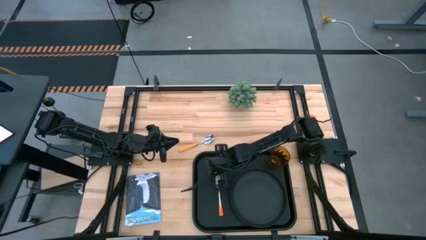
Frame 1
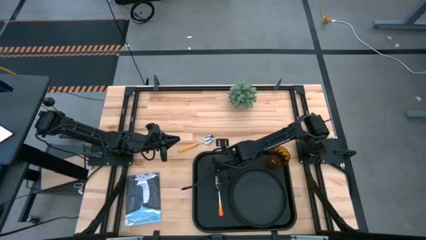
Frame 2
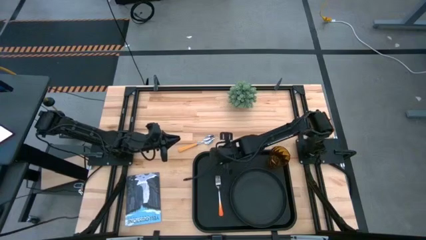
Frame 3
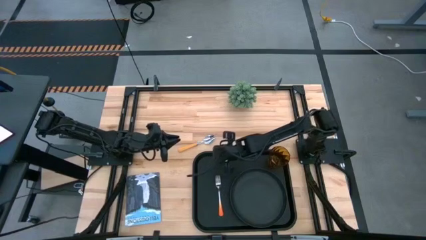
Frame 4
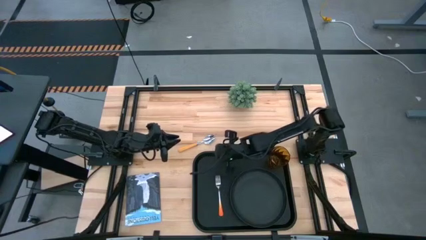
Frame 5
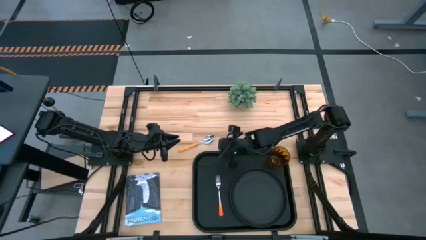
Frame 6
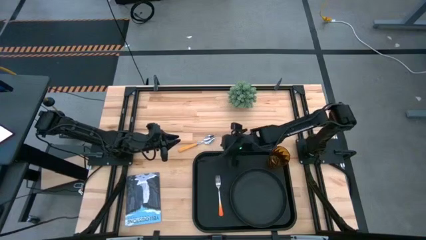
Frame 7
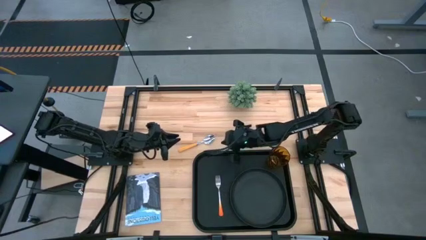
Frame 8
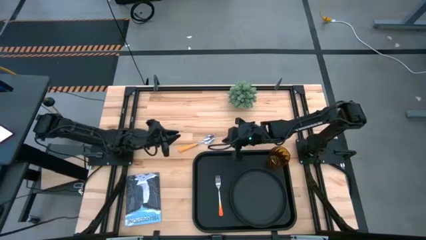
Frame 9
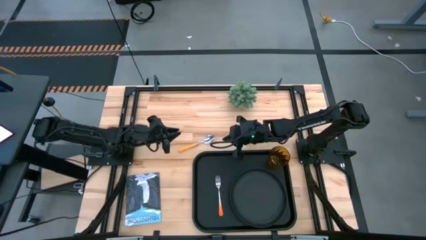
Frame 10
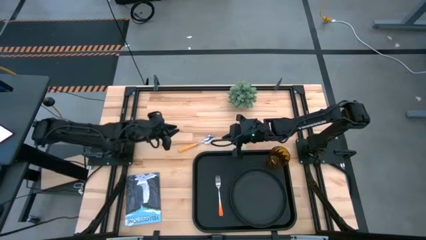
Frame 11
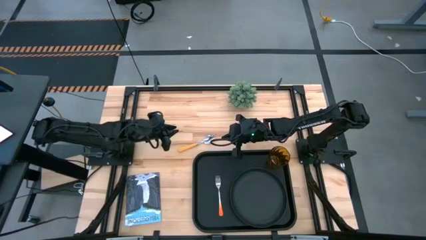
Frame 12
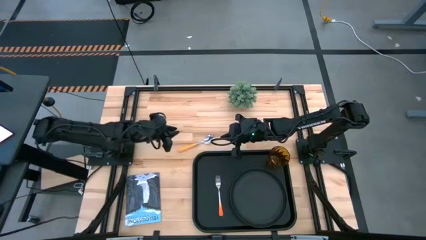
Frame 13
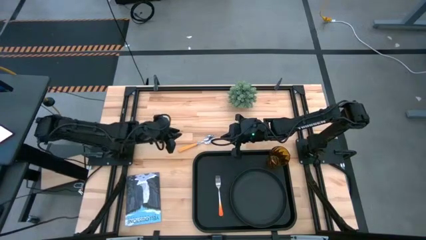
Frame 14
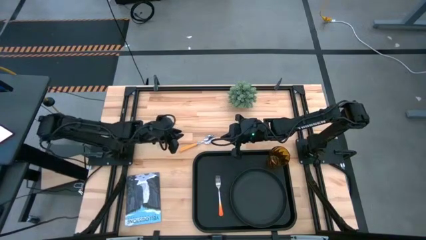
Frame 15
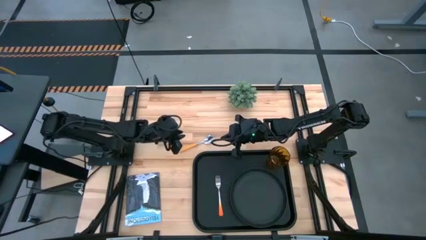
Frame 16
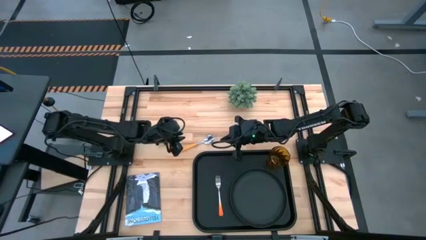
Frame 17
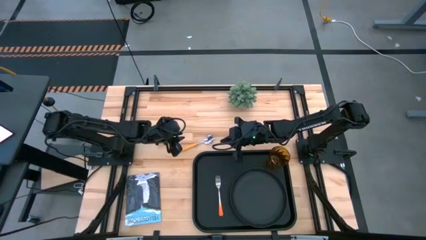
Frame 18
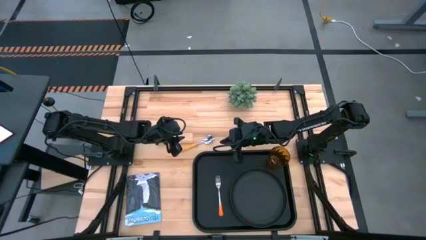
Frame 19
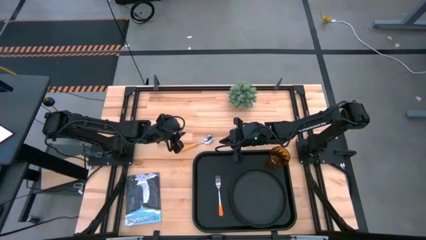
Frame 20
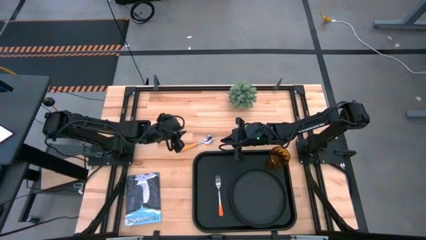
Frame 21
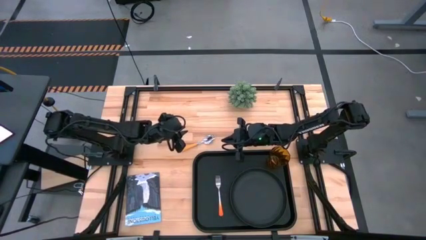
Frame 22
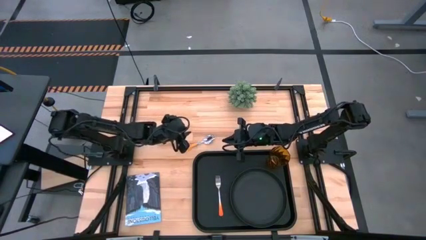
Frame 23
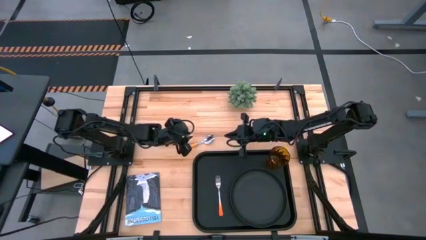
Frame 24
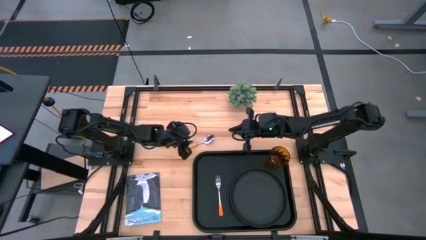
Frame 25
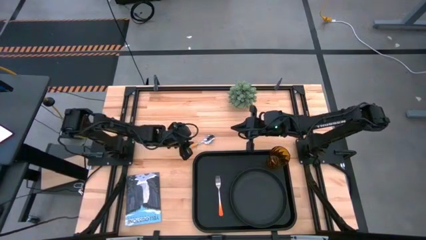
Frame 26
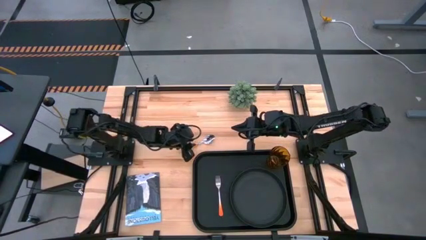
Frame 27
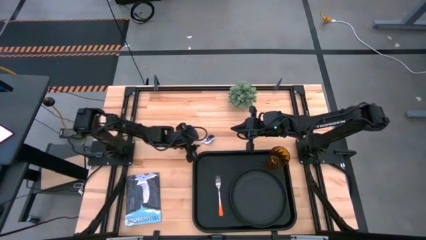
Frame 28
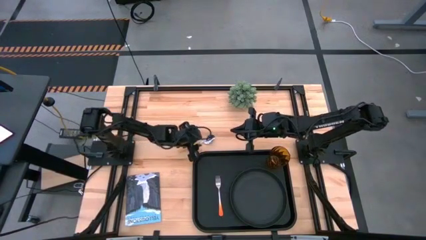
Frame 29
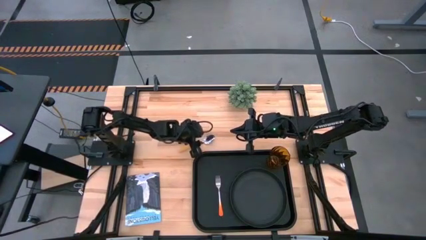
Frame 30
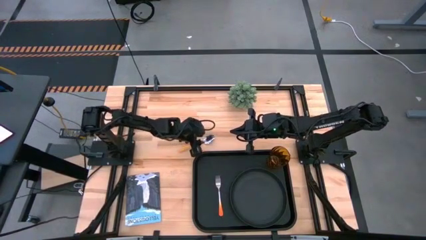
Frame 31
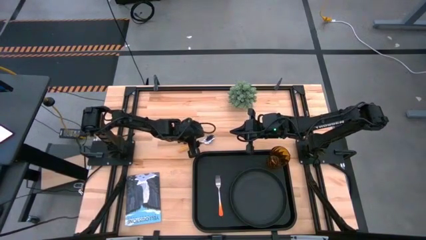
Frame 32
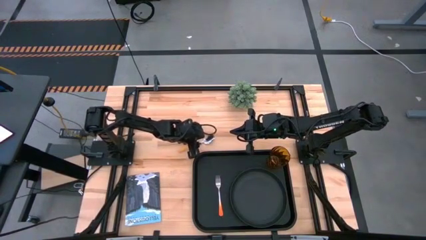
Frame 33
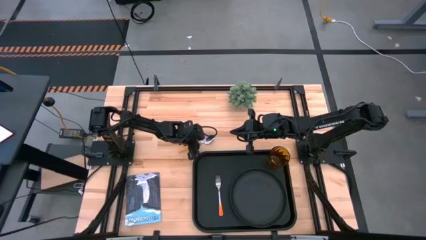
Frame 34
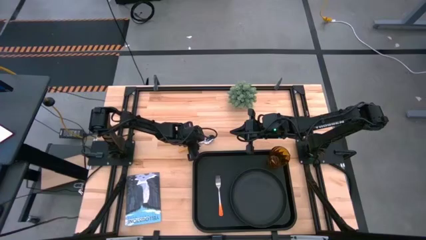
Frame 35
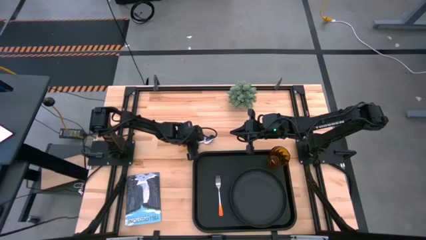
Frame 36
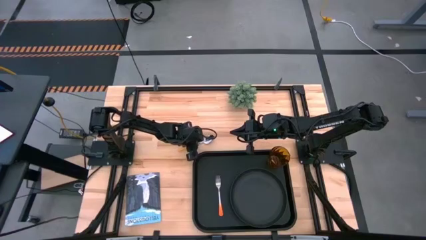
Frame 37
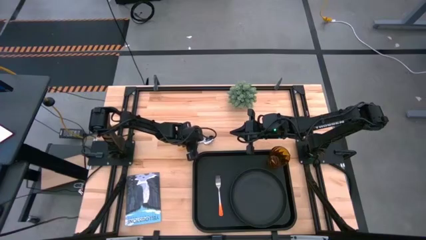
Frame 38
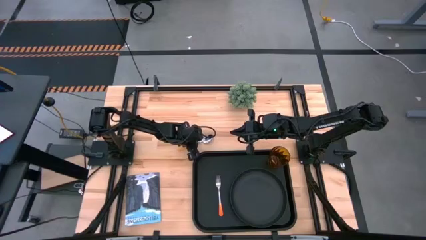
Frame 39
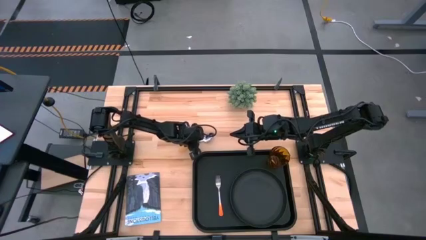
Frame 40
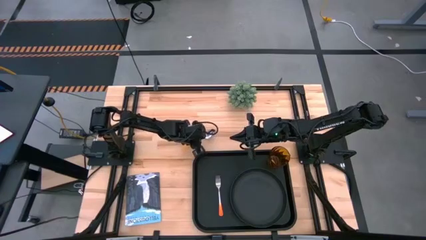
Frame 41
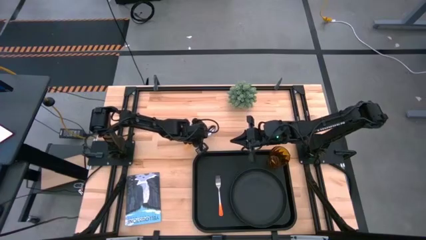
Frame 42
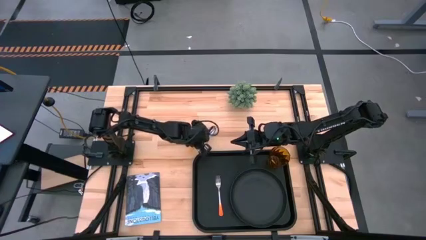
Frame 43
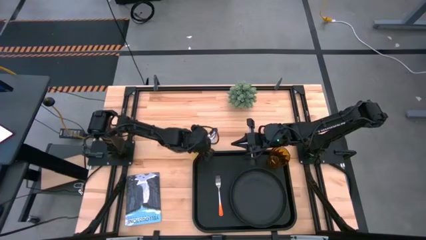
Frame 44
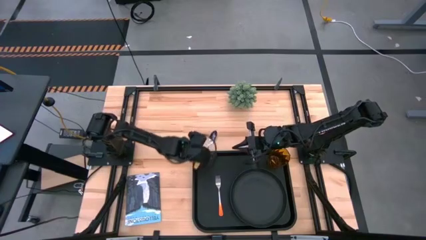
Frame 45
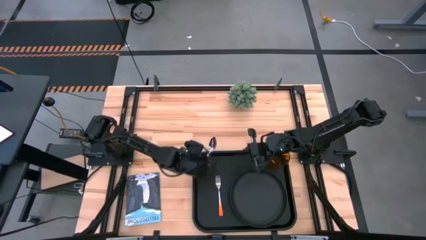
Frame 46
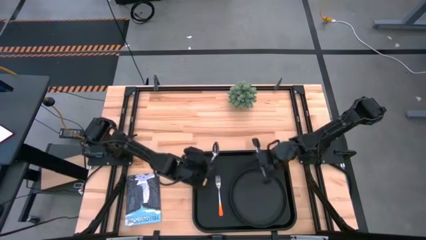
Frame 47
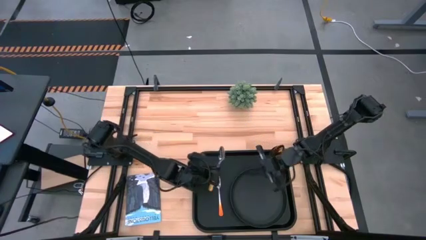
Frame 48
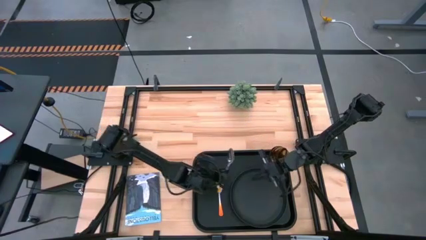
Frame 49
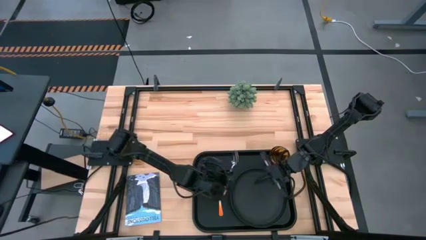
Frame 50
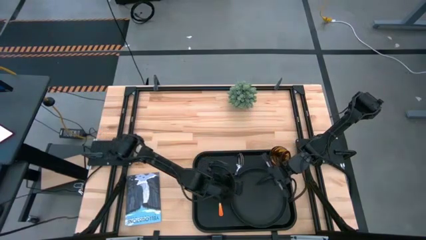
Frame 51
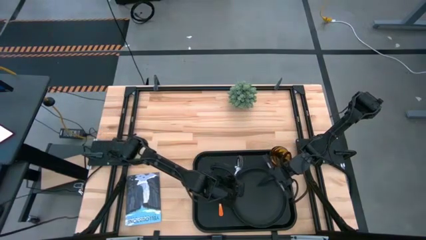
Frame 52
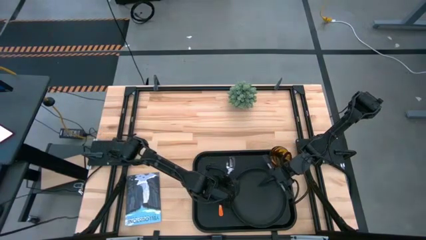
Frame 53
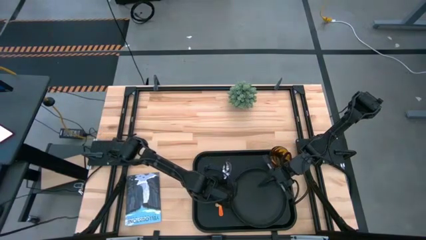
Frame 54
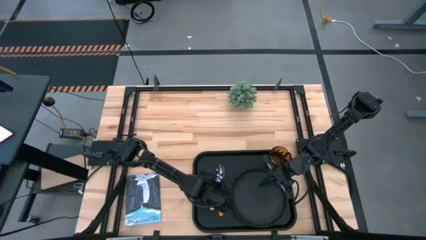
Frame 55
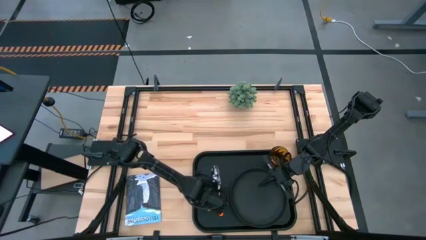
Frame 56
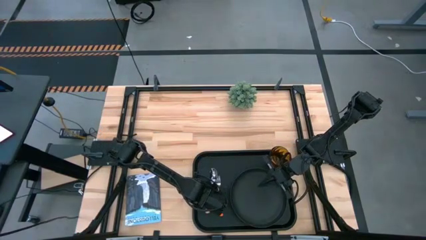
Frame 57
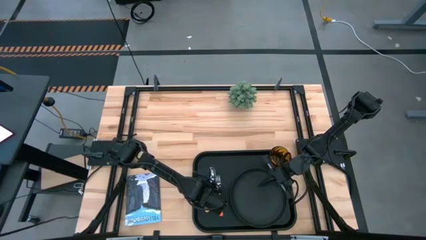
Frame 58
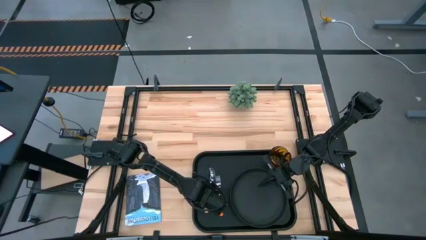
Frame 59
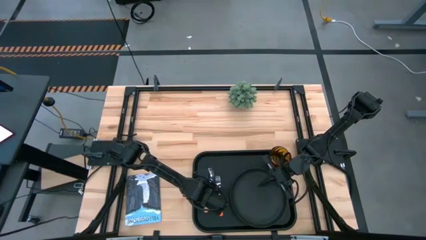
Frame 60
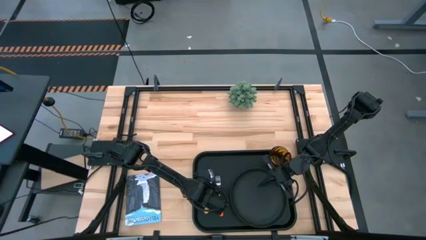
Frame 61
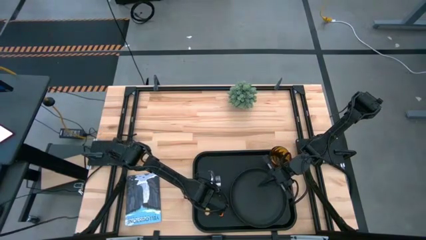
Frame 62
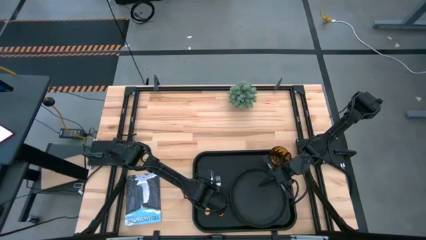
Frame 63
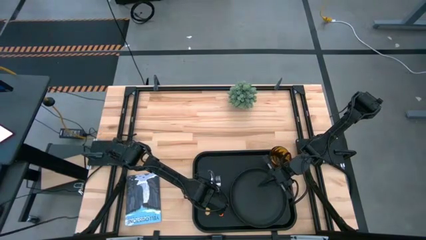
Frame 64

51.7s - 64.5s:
Task: Pick and place plate/cup/fork/spoon on tray
Put the orange spoon beside the orange fork on the black tray

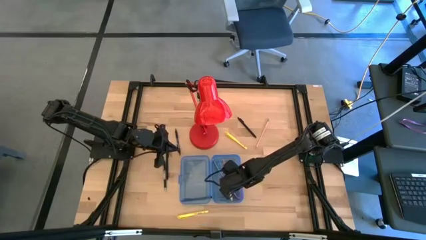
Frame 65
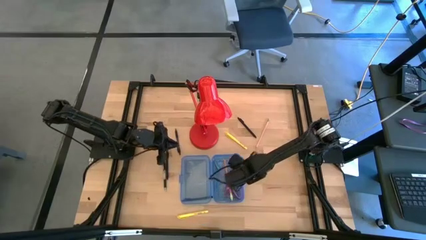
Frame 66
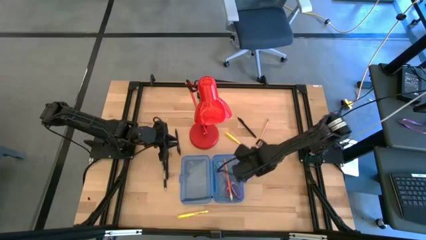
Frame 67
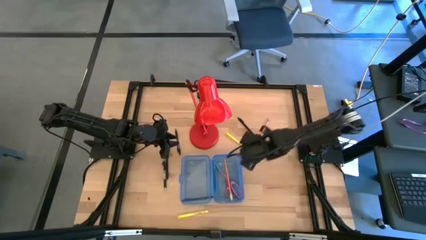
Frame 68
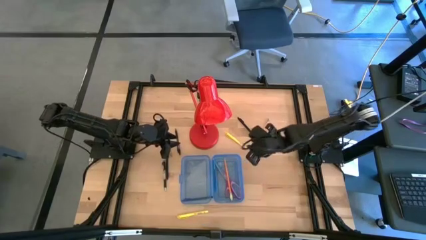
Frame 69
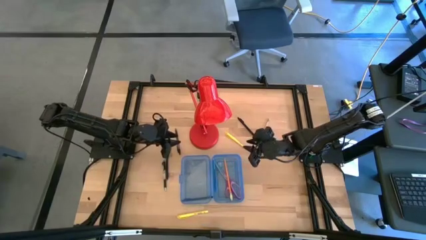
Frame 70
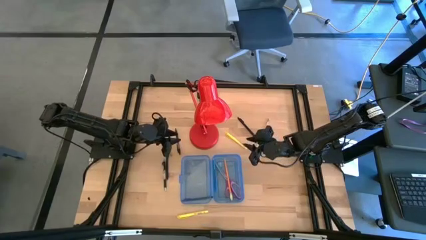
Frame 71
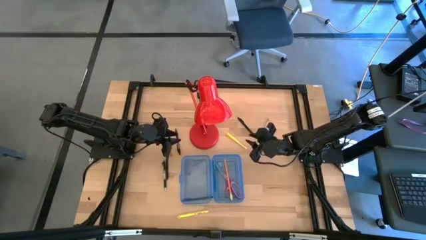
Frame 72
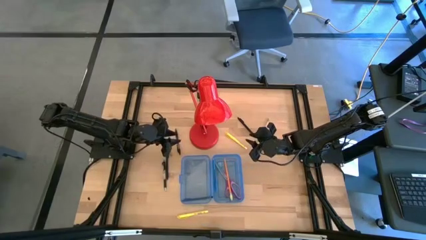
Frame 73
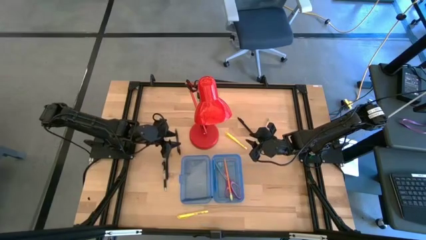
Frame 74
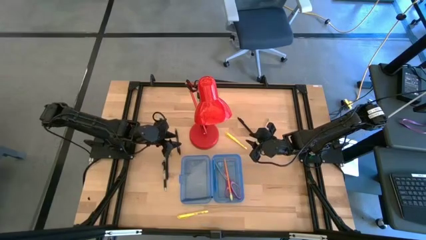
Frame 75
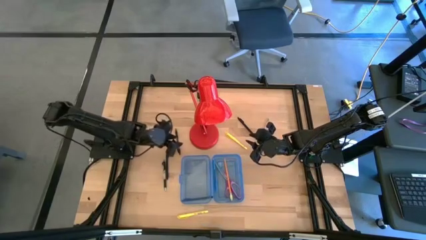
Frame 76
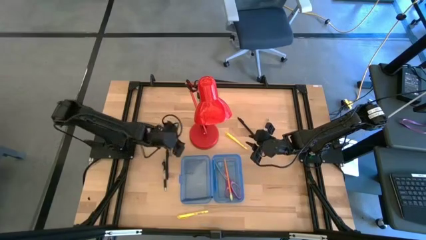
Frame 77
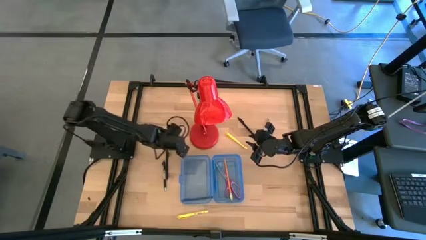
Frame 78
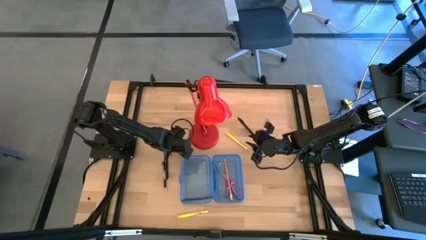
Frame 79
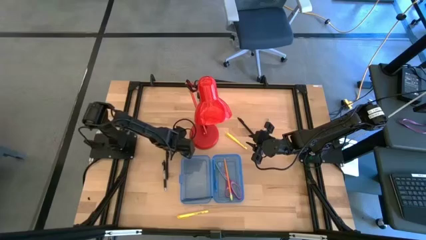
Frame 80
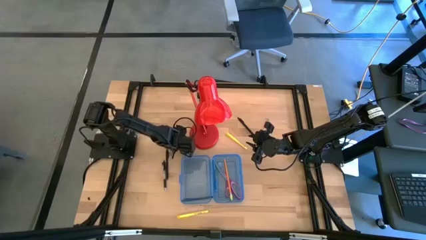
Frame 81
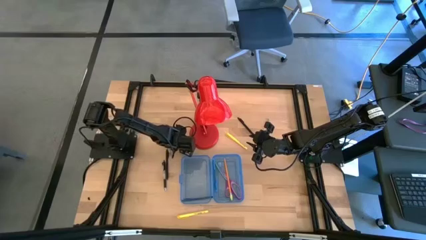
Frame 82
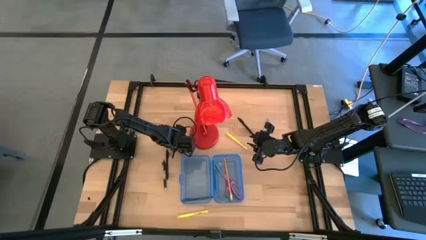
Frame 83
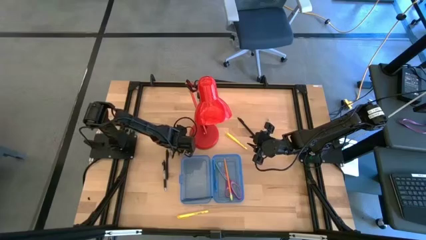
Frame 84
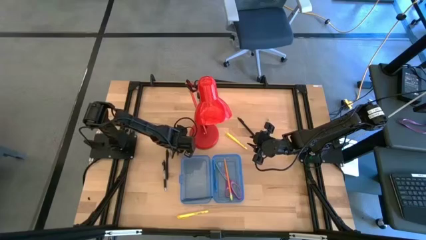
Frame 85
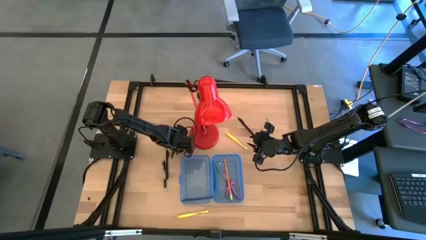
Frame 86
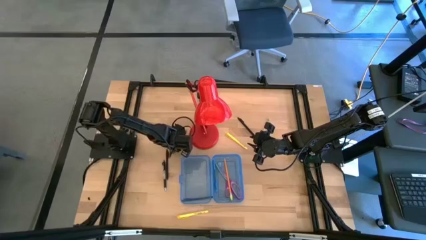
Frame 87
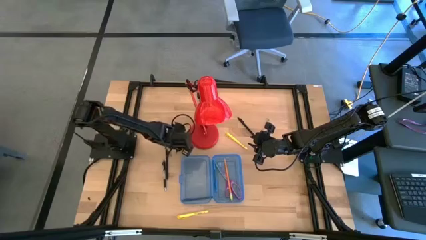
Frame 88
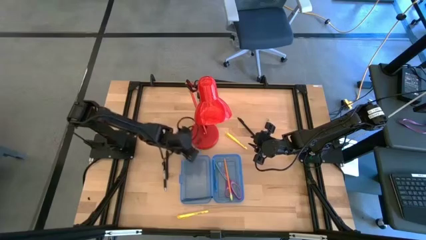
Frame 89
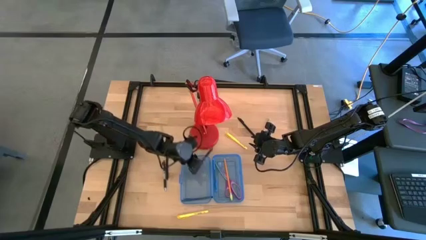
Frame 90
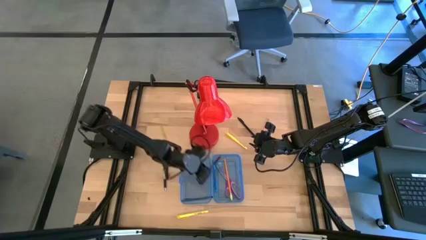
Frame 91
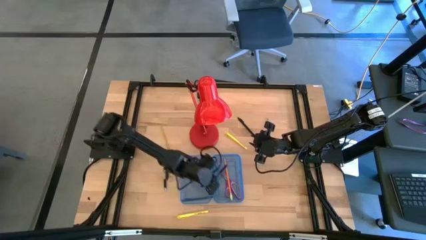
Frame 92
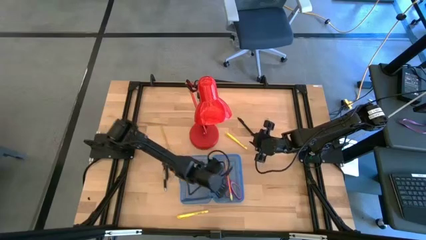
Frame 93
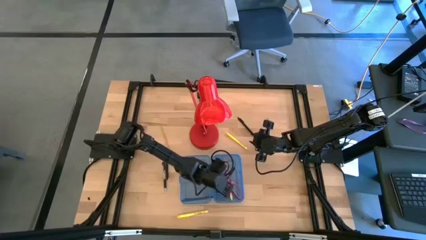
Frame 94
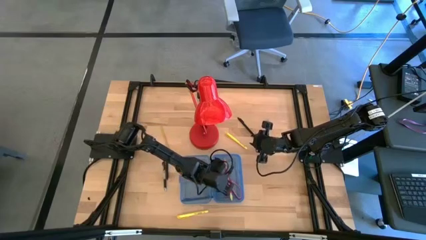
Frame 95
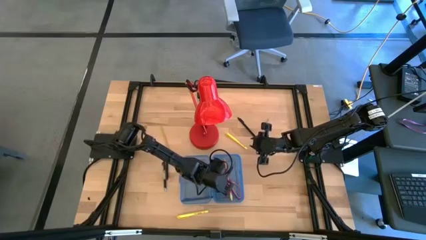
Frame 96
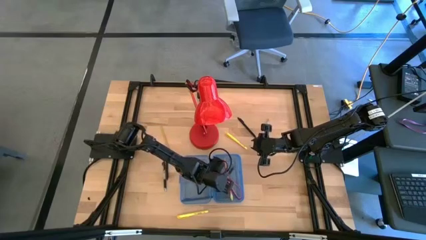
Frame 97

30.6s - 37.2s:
Task: Pick & place school supplies into a supply box
Put the black pen into the blue supply box
